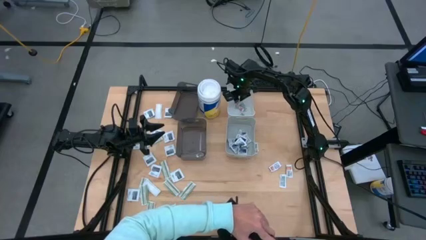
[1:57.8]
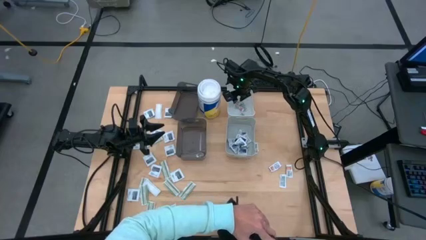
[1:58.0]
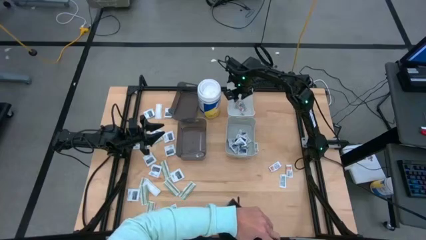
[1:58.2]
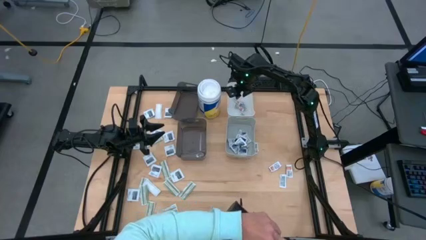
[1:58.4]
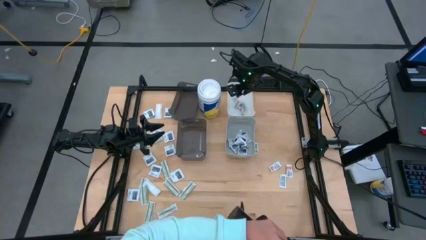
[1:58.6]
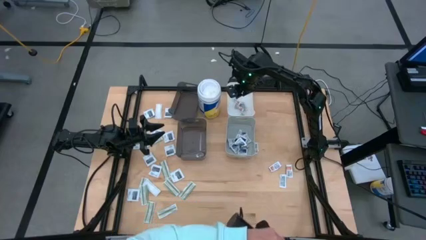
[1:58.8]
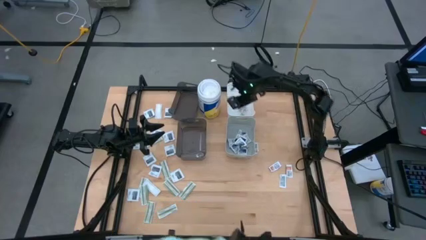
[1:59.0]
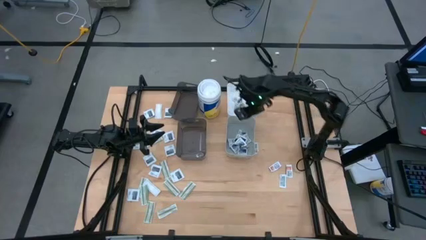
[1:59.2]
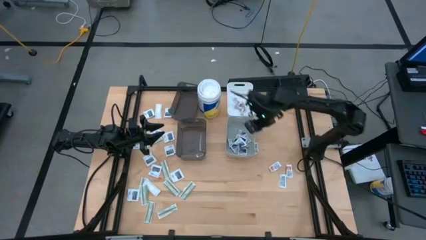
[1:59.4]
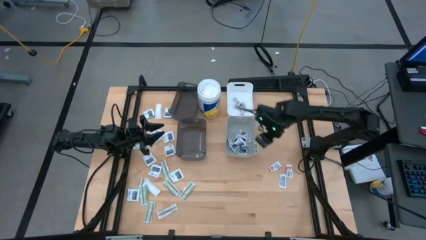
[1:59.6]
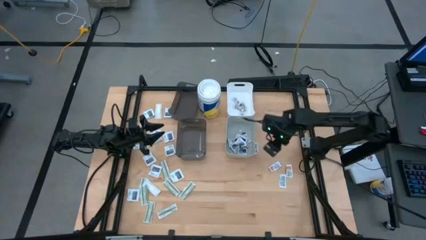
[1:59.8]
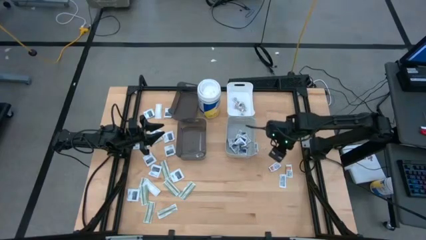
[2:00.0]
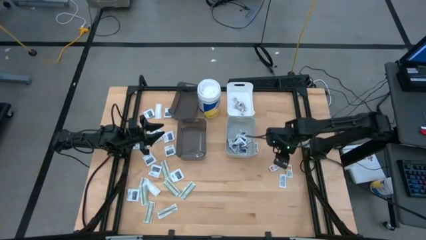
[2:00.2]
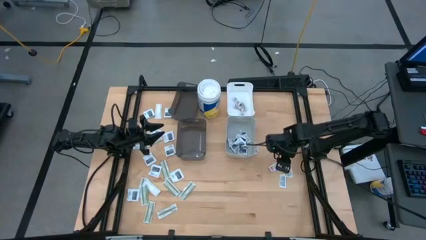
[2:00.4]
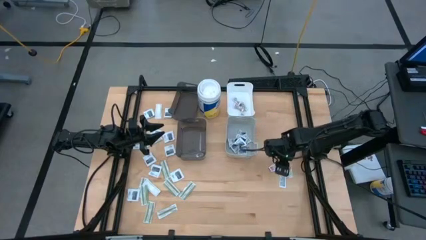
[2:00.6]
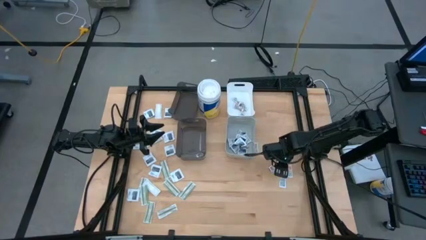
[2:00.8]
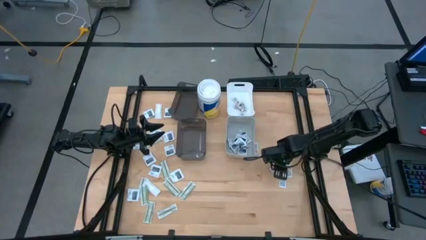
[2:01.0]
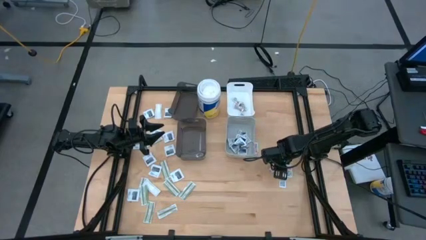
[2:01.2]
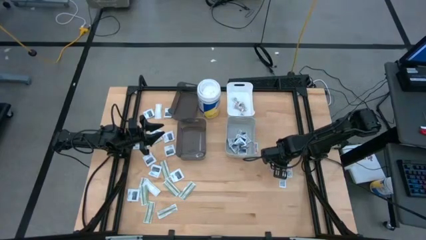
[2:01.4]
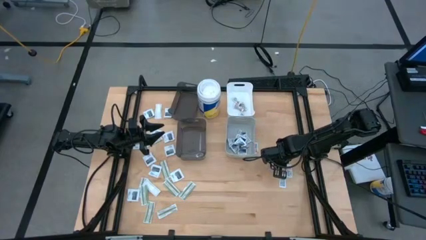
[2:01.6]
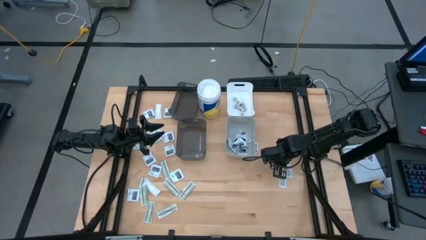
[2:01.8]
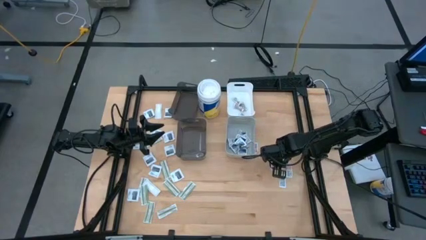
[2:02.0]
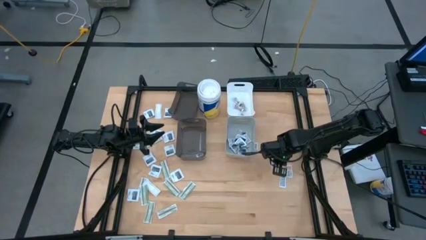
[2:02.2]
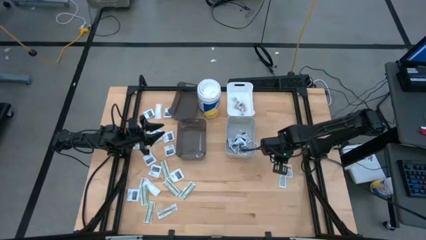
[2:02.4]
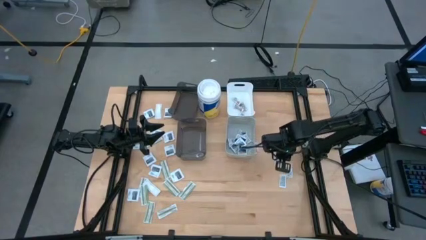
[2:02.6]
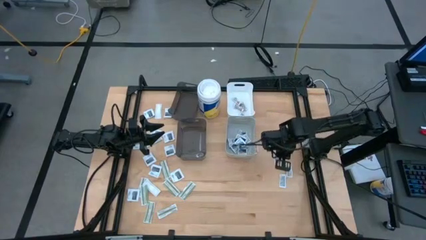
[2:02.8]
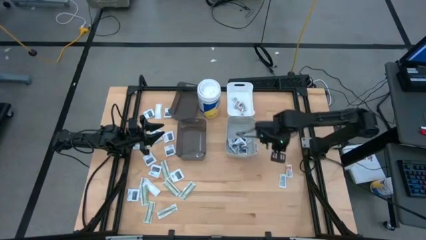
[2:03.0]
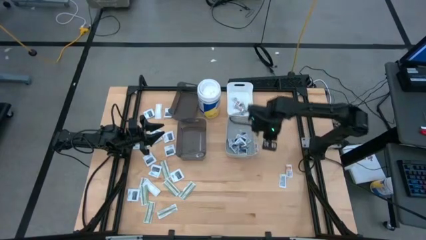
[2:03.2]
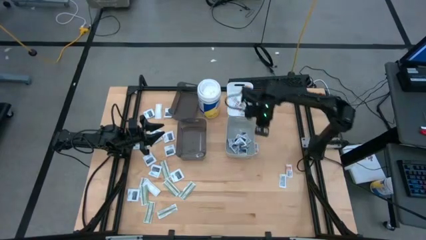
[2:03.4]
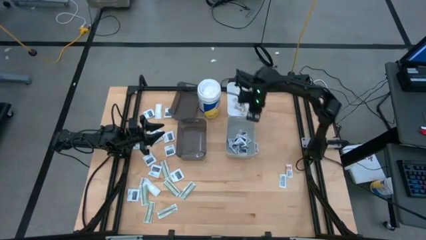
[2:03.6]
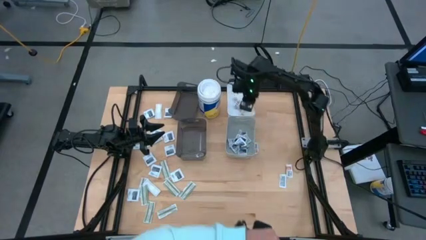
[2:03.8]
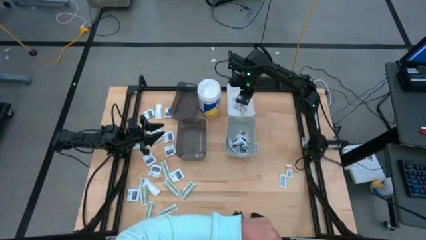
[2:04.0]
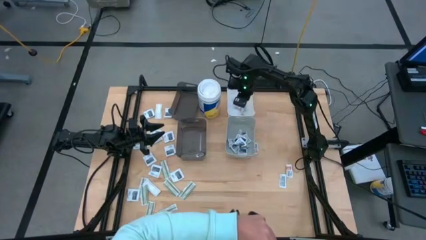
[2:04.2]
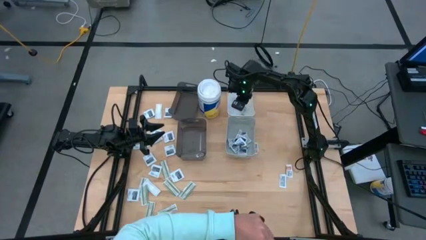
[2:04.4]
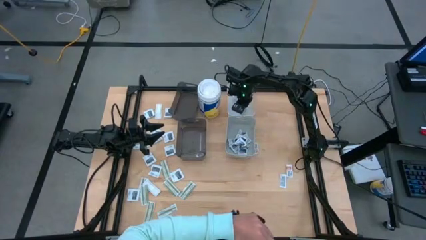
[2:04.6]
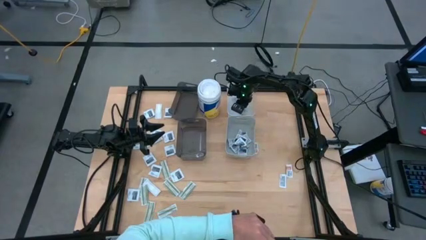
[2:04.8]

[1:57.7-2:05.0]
Task: Pick & Place First Aid Supplies
Put the ointment pack into the white bin

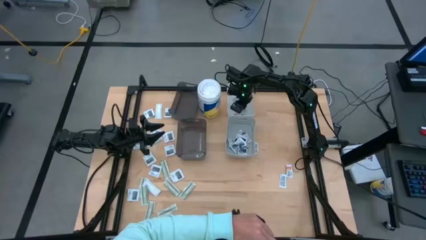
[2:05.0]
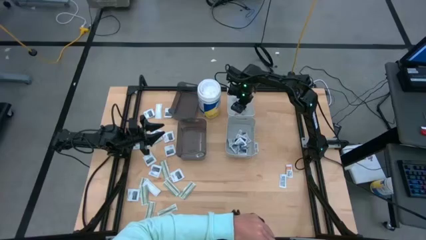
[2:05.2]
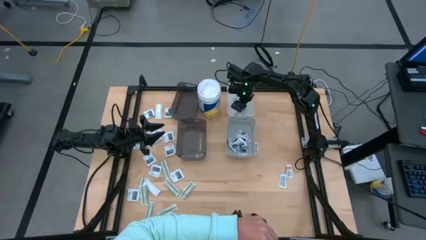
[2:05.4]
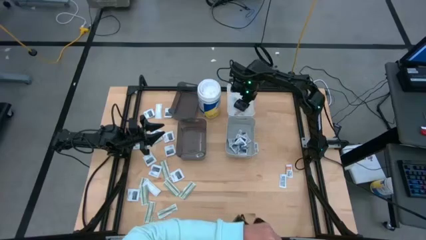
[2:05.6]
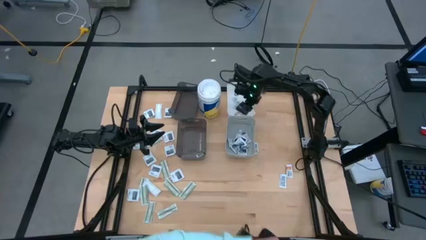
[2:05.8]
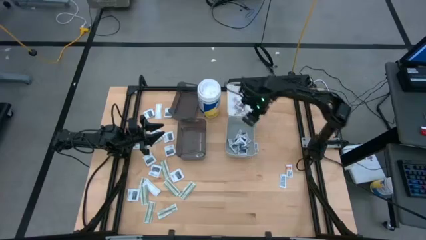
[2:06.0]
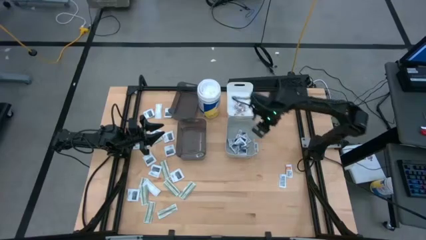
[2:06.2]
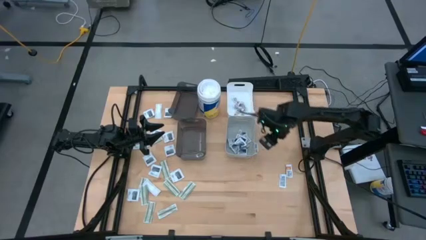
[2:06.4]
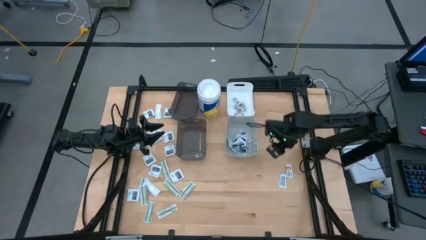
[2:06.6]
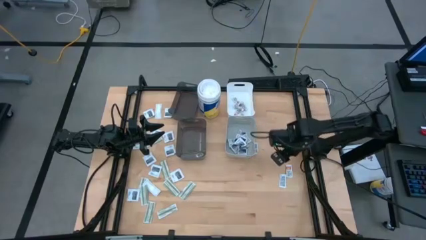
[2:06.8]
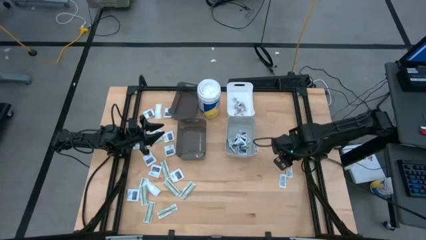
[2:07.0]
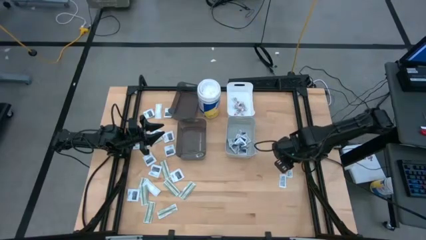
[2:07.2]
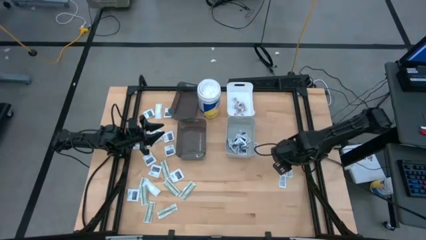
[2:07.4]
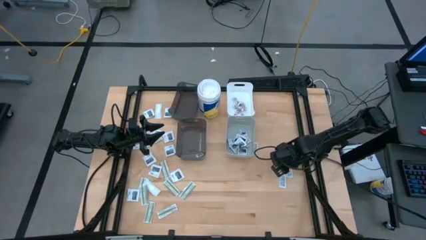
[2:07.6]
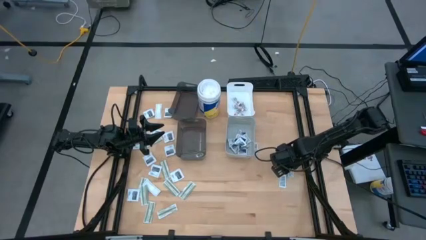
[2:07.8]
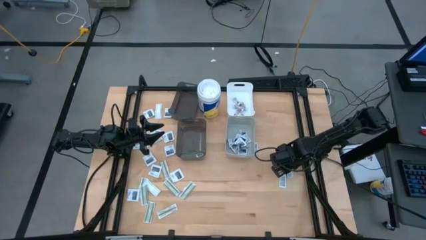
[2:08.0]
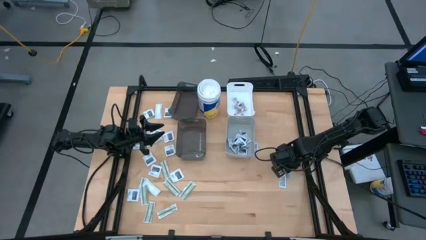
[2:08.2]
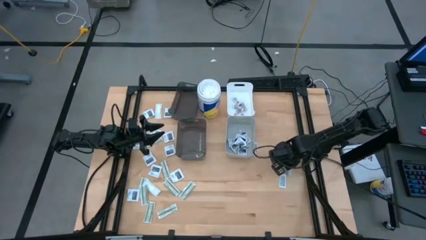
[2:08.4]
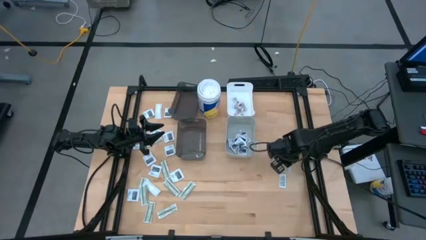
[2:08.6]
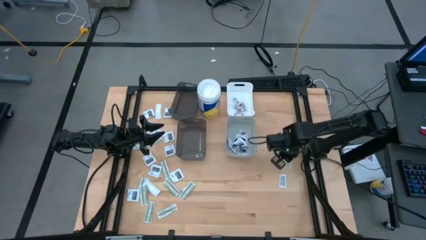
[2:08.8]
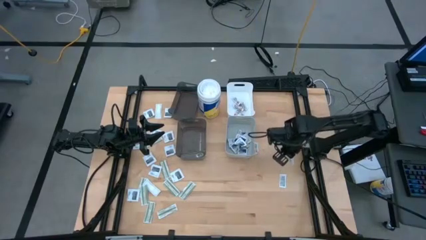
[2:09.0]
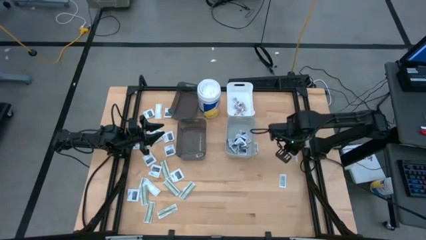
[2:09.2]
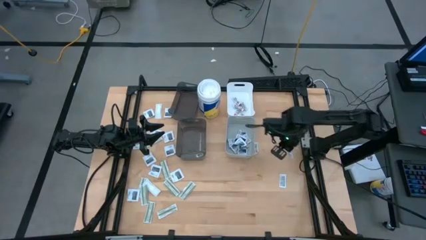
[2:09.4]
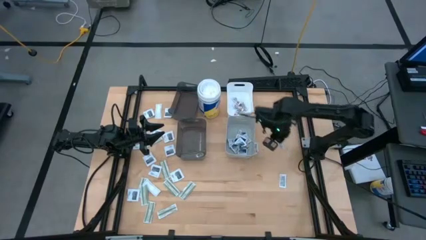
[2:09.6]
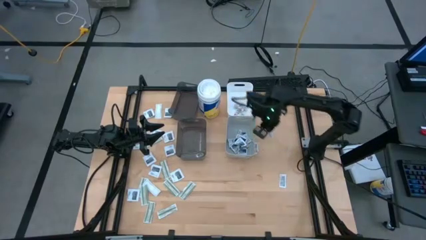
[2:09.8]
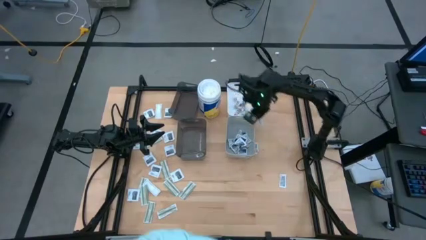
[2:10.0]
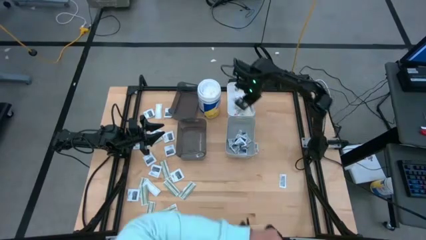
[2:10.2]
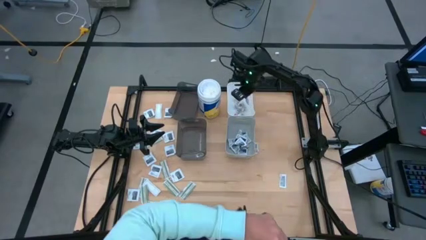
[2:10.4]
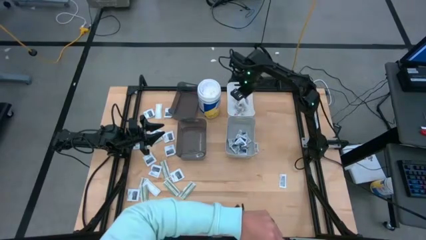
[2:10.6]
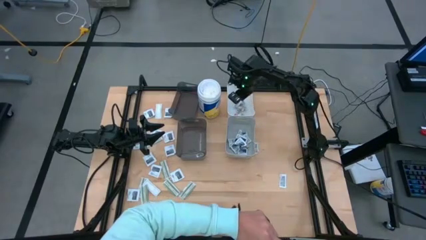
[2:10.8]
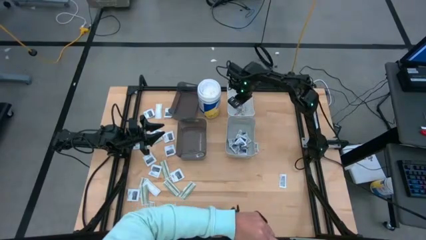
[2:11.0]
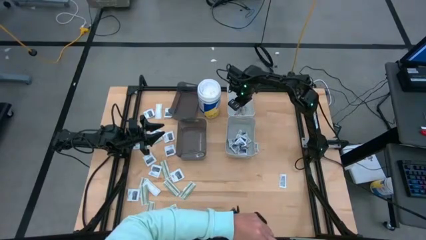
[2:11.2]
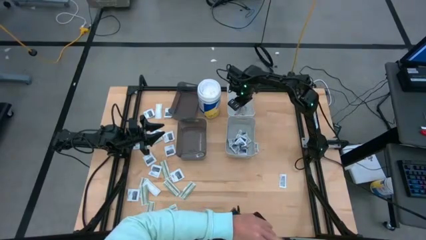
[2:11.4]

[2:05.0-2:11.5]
Put the right ointment pack into the white bin

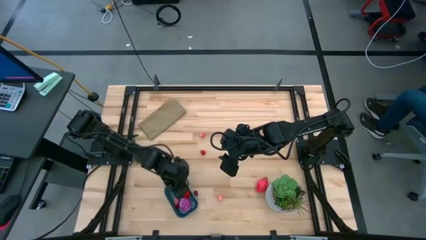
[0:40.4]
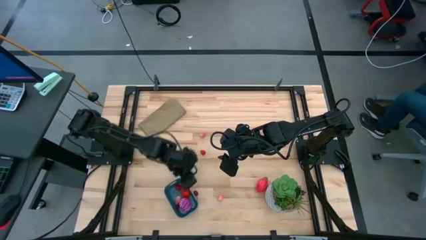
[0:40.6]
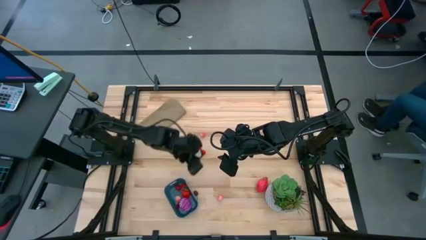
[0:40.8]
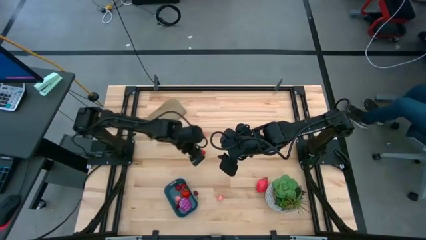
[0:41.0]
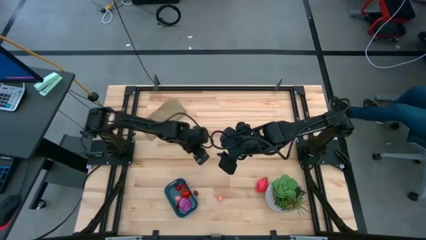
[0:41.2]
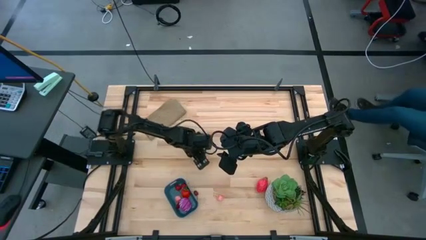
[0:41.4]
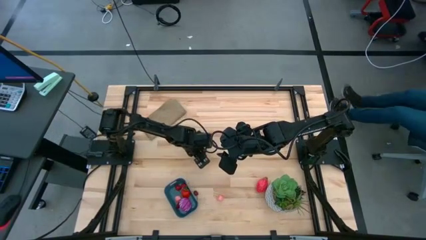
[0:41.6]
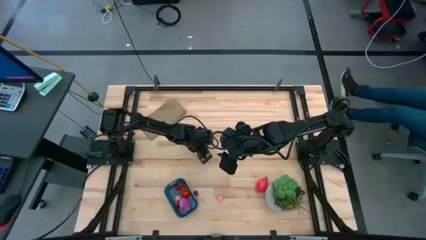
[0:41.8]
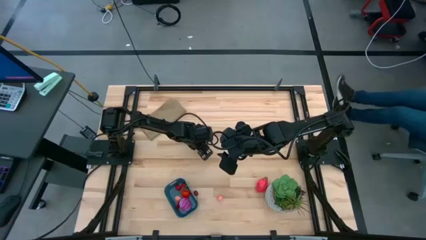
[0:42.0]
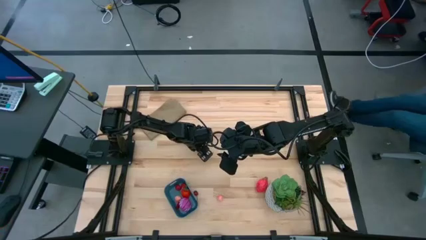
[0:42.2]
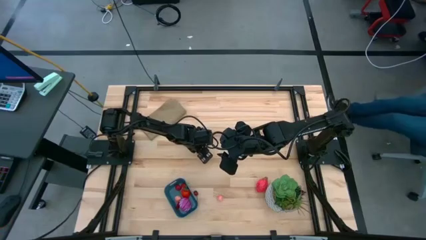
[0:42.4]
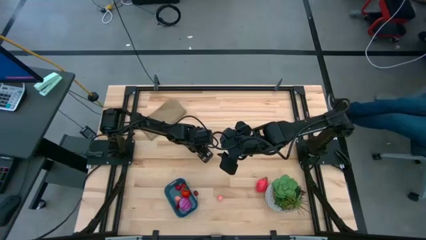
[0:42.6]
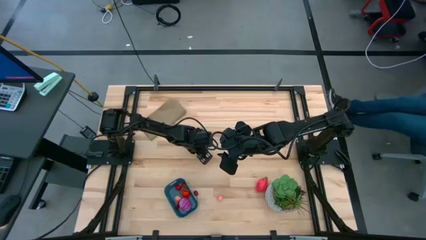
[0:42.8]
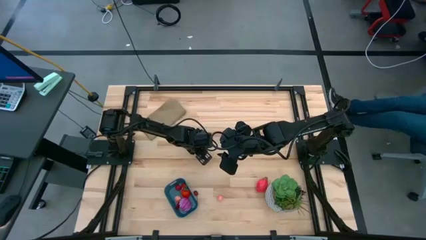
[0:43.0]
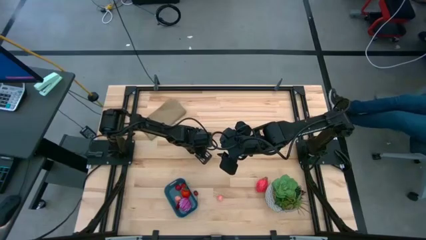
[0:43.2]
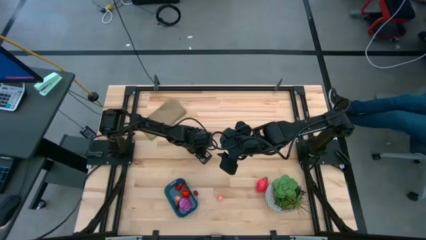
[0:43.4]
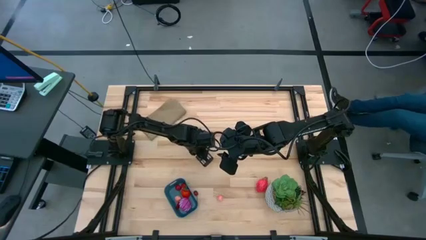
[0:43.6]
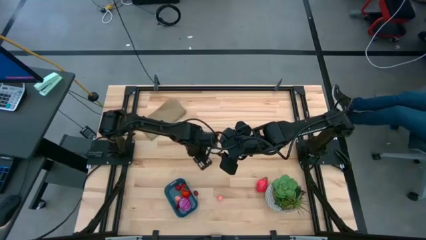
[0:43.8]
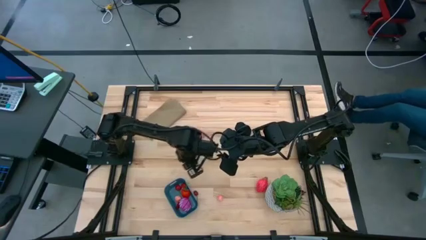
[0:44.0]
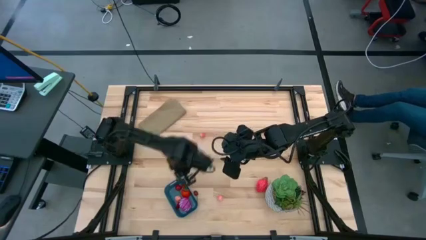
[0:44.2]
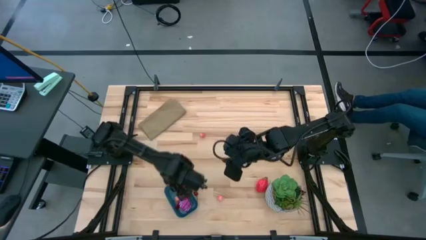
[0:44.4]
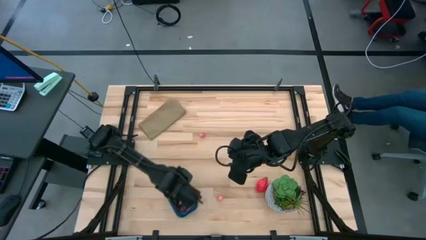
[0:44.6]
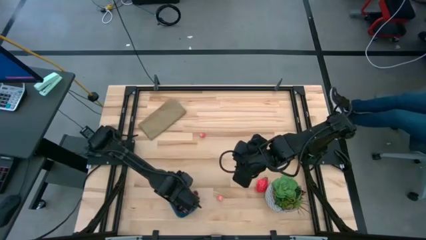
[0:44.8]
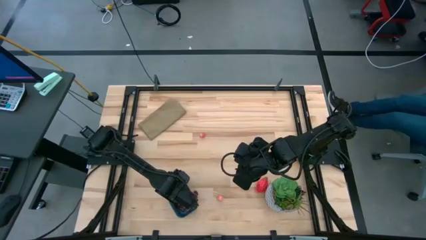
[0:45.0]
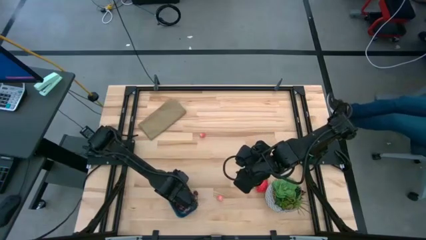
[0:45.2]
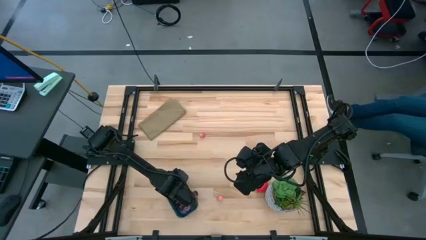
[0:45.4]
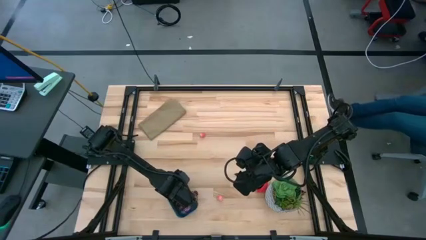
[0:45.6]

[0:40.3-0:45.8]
Task: Pick and placing Produce into tupperware
Put the red raspberry into the blue bin
